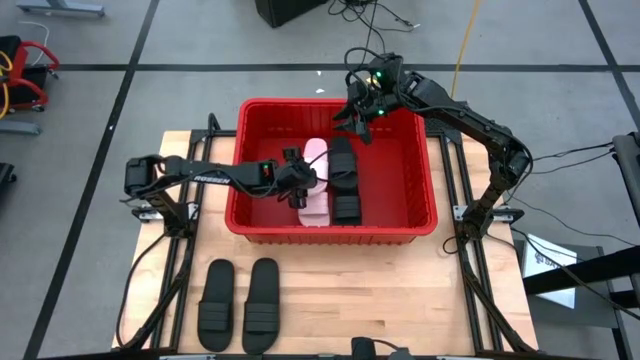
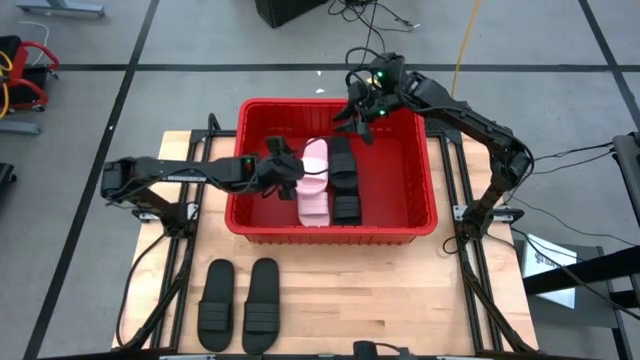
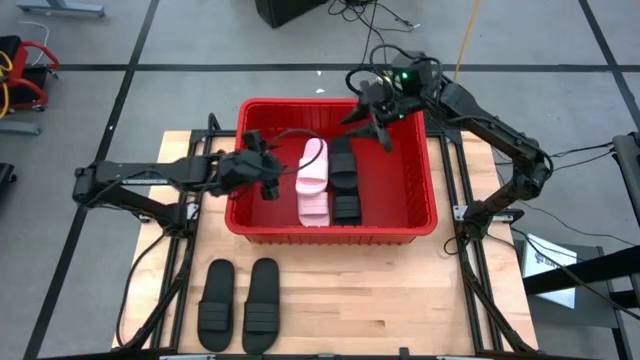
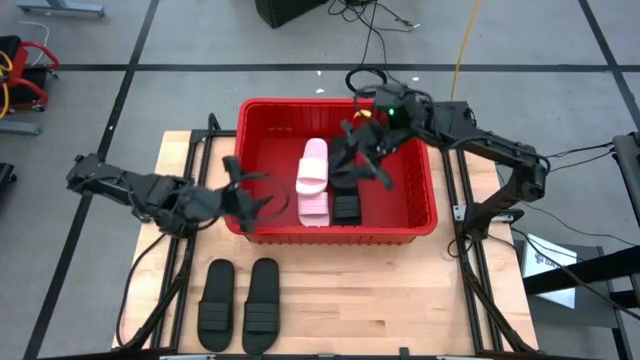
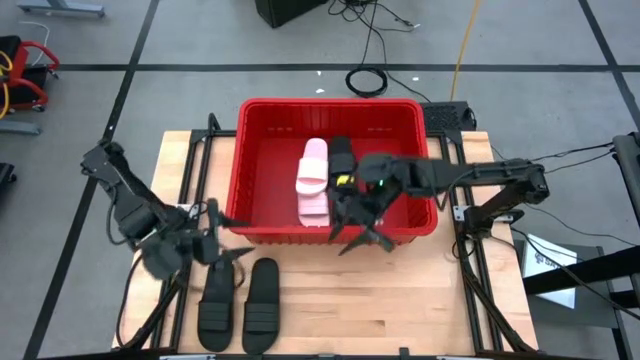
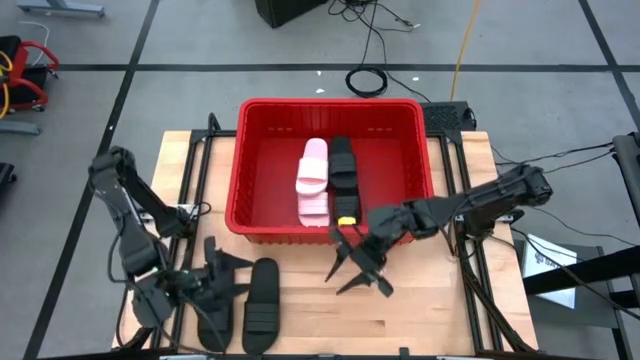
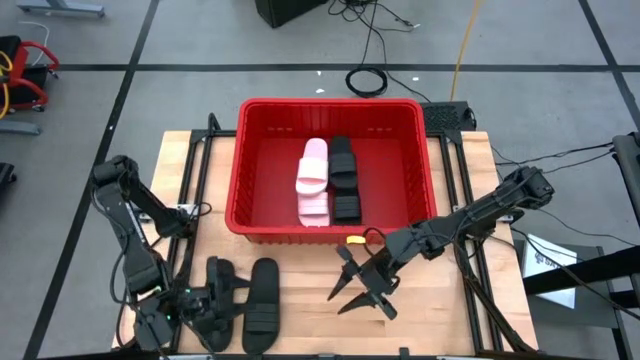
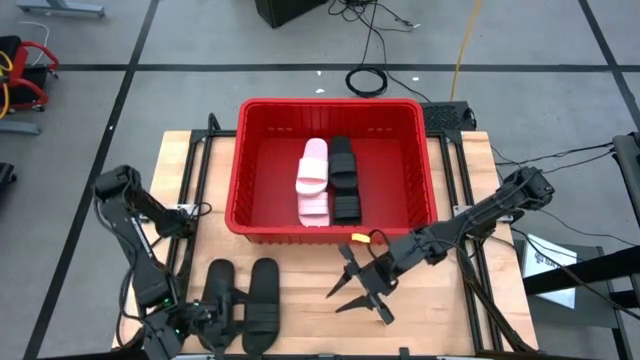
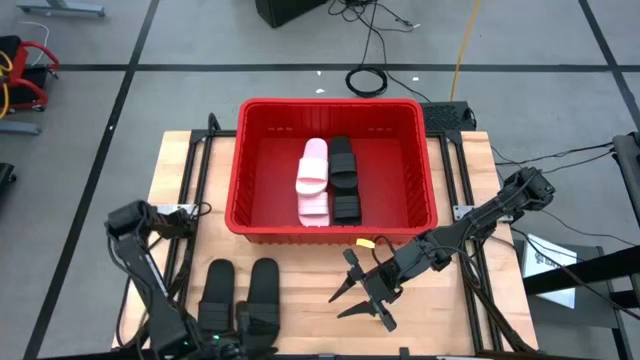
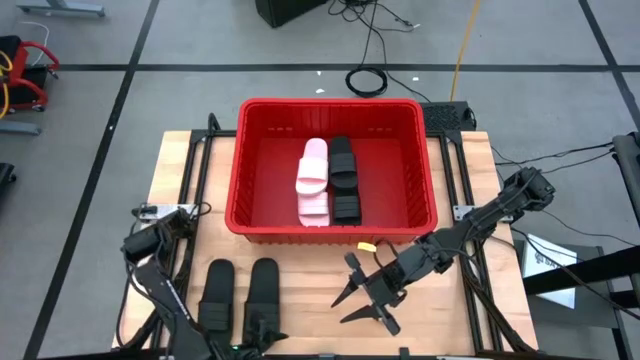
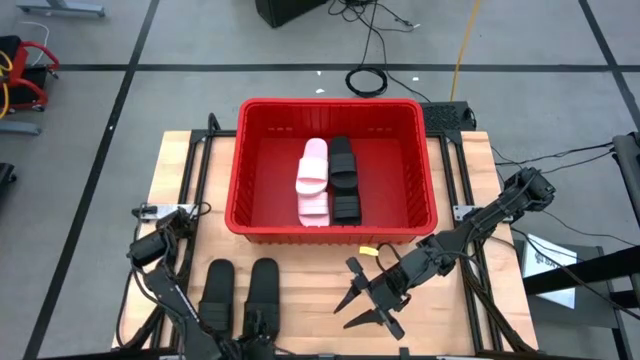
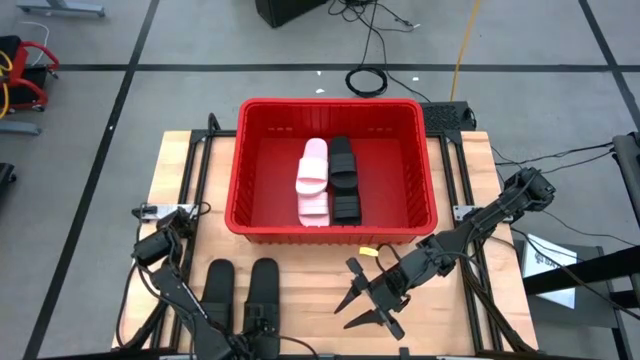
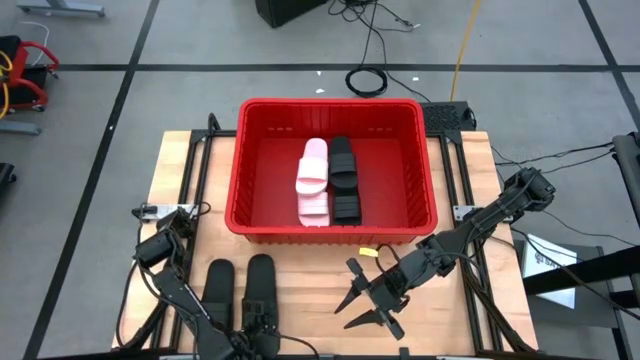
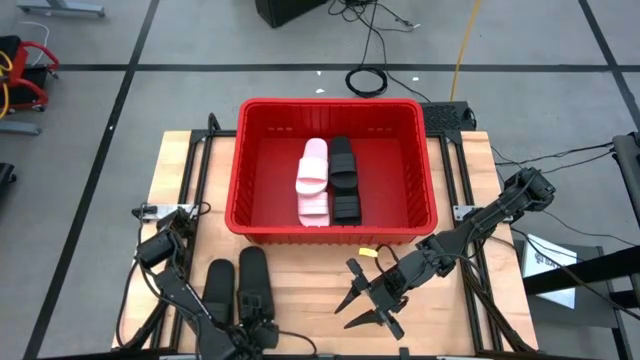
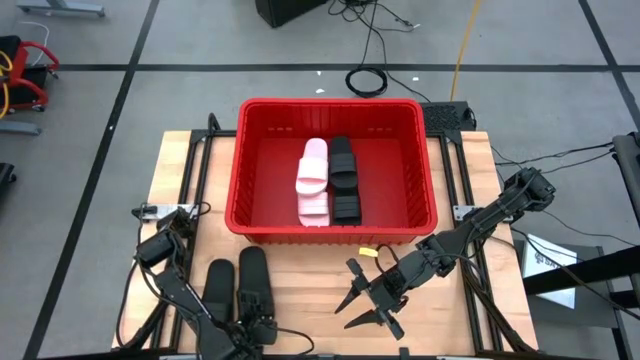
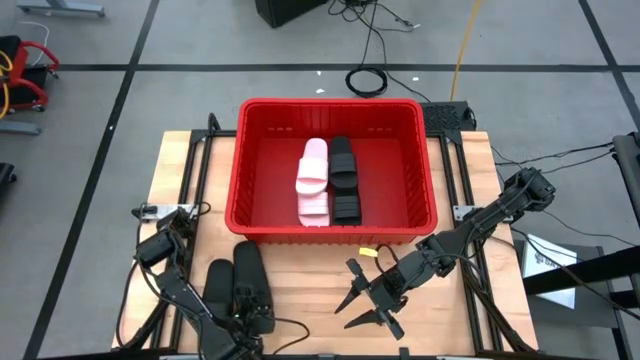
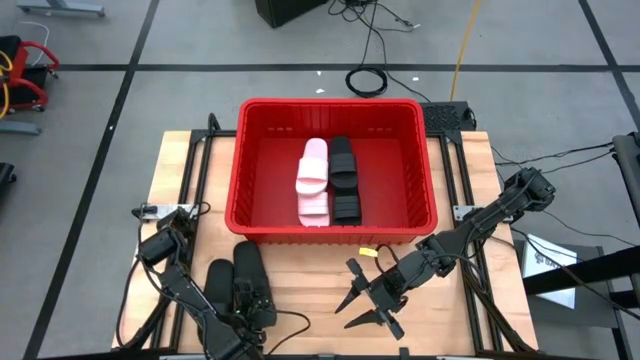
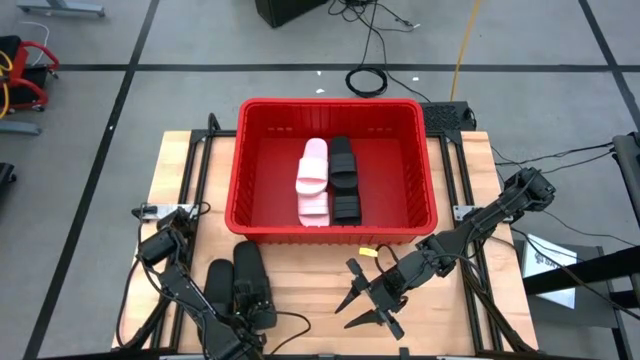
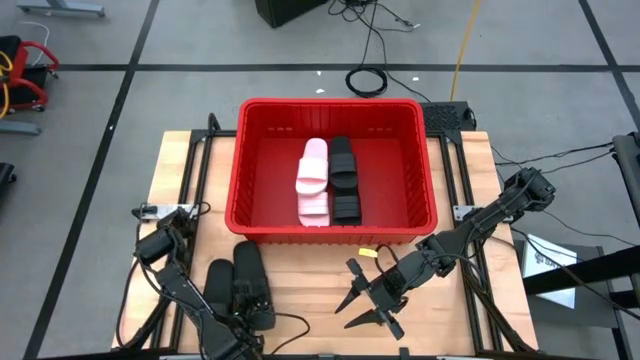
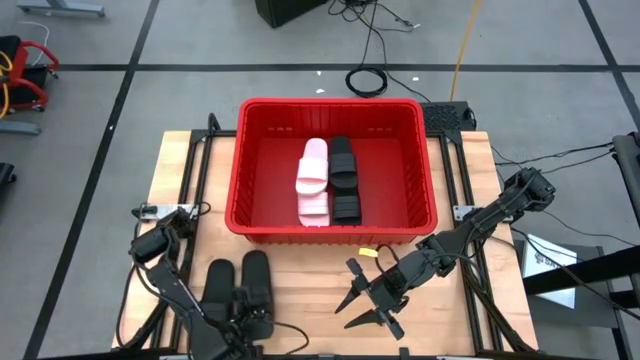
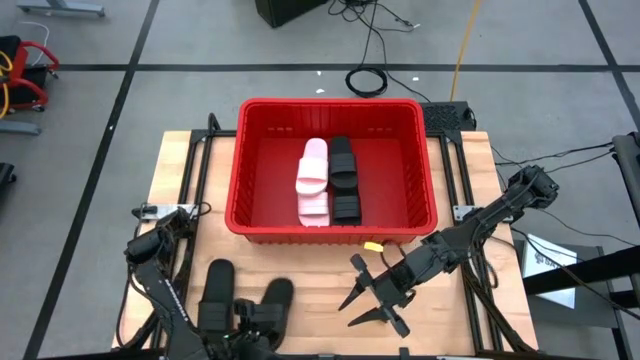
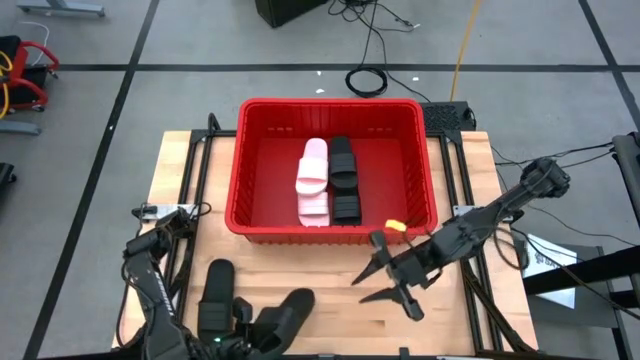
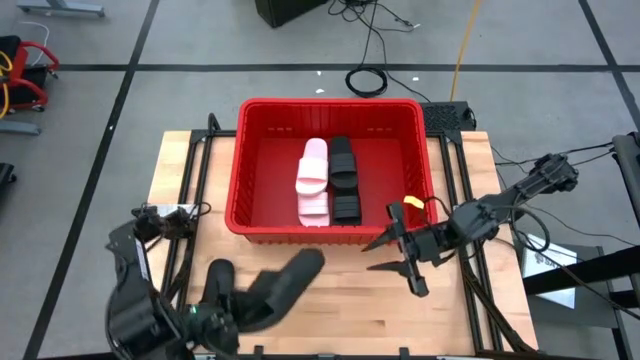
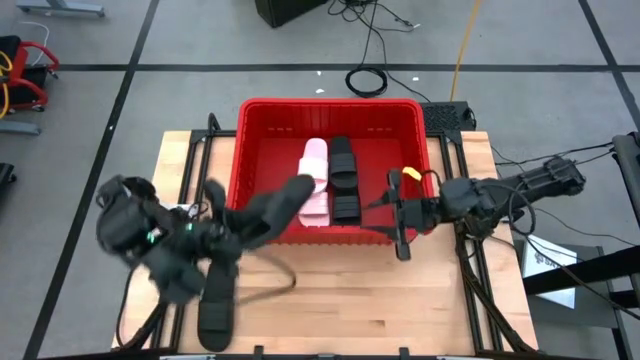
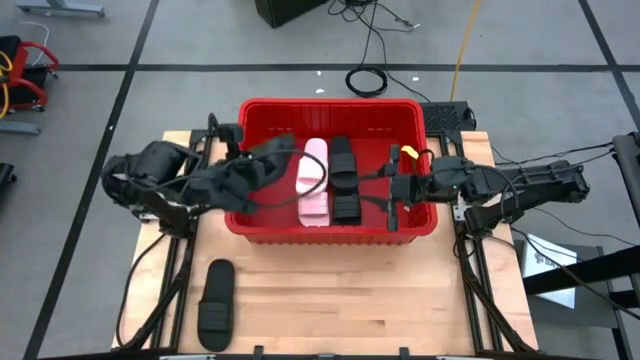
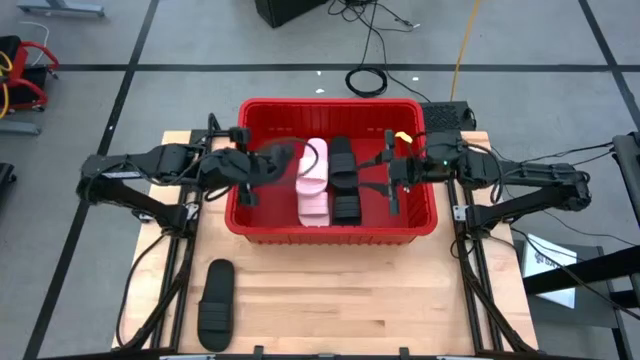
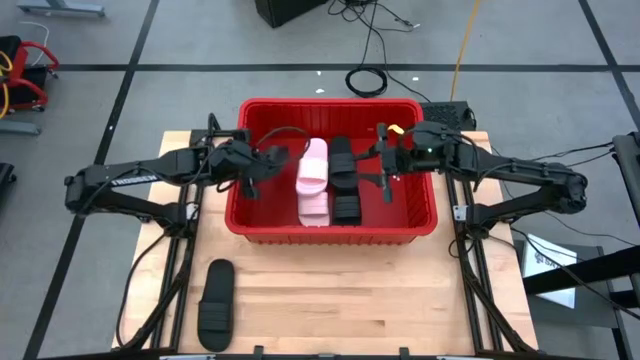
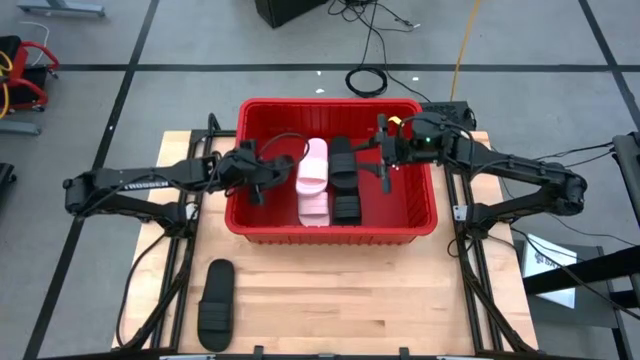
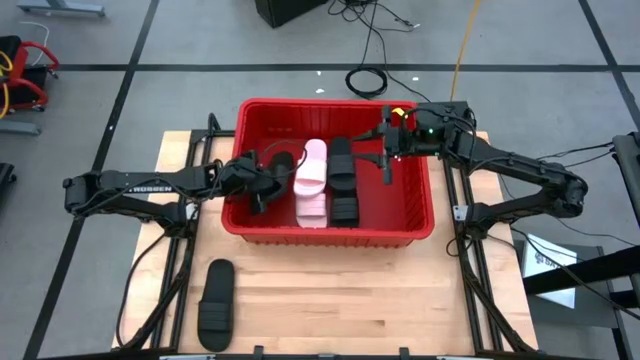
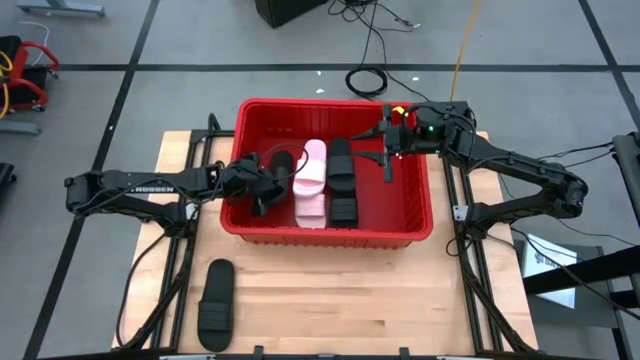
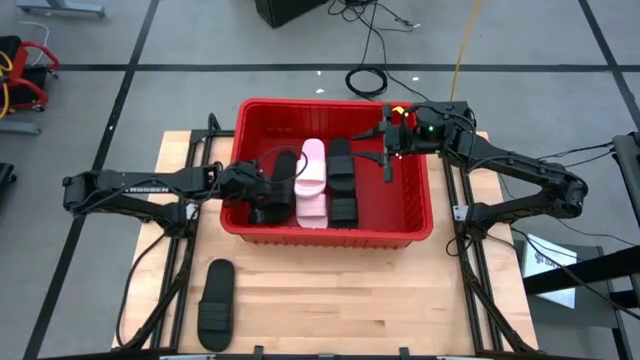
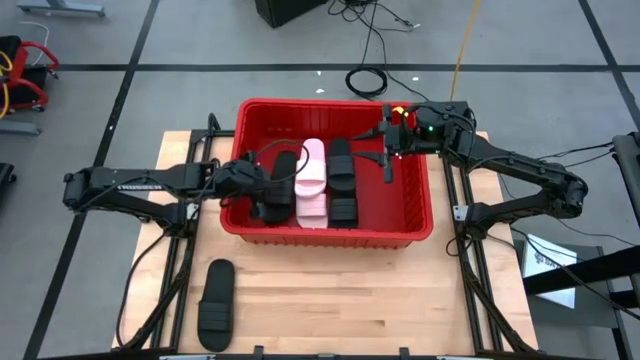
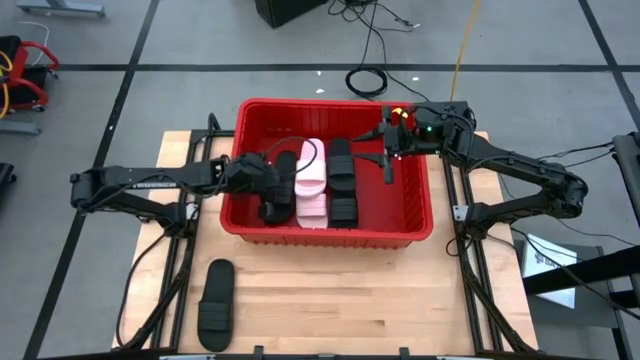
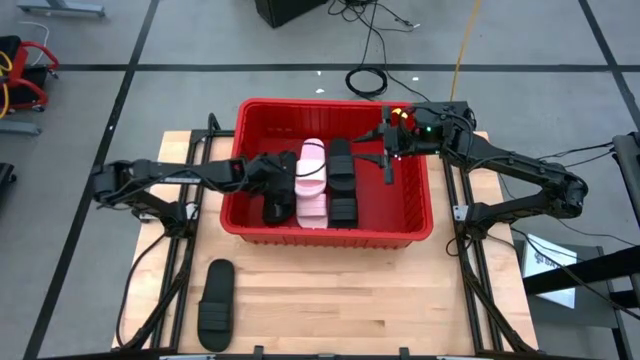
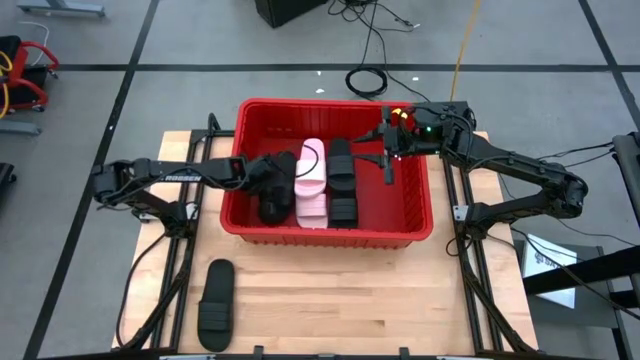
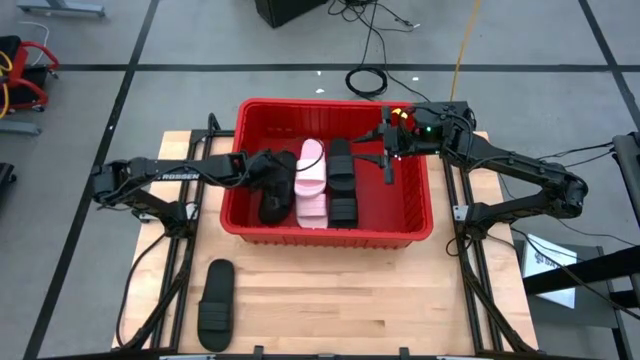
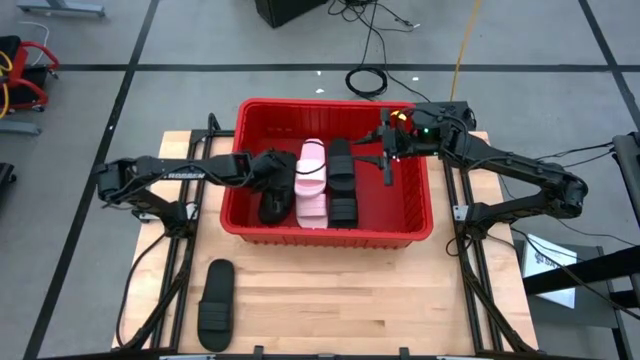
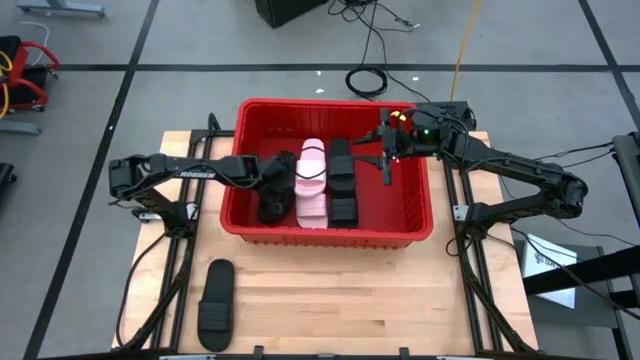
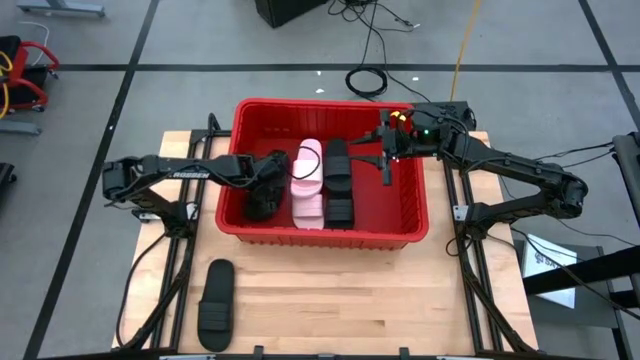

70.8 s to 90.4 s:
Task: Pick and place slides into bin
Put the black slide into the red bin

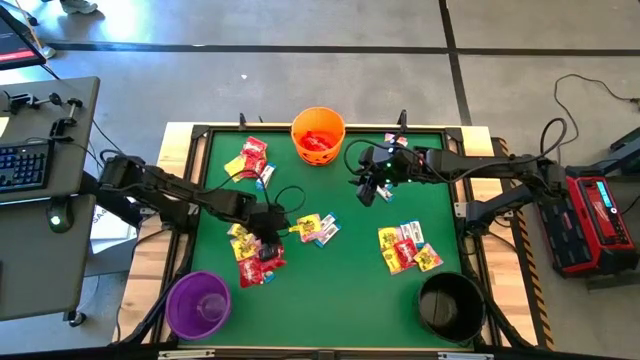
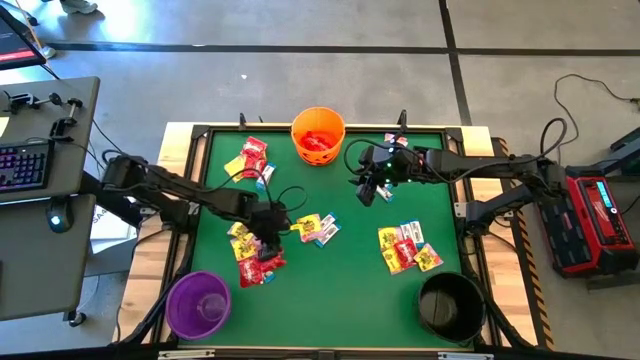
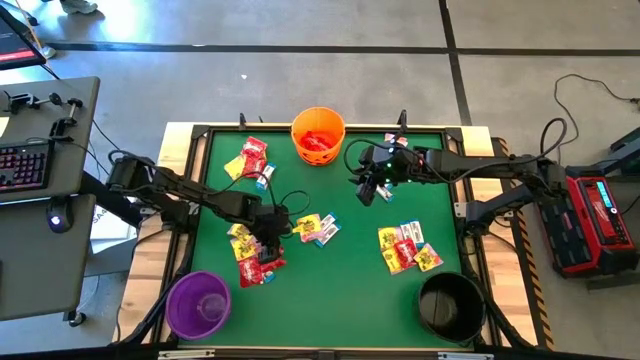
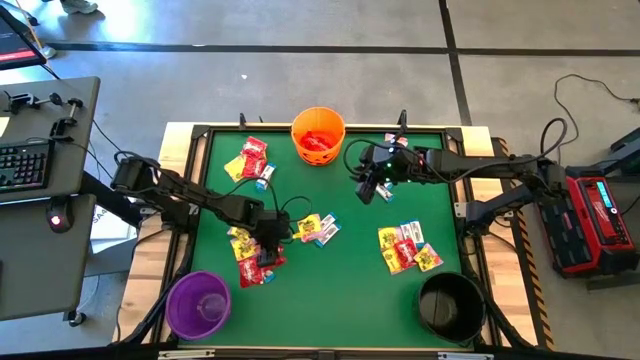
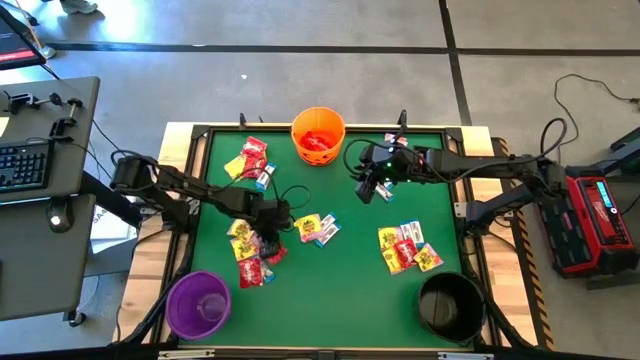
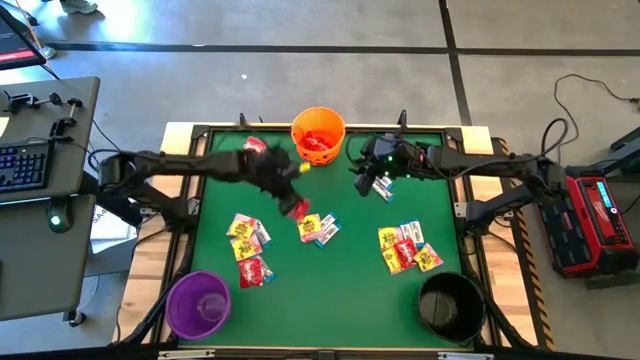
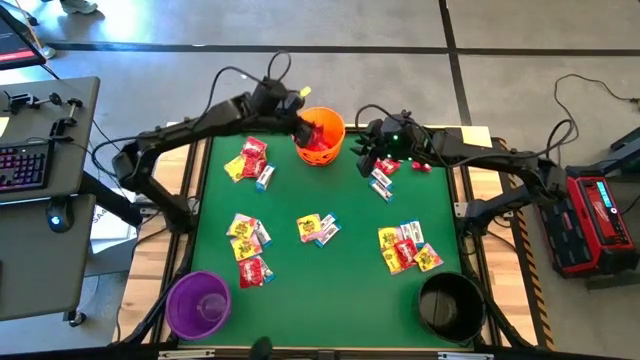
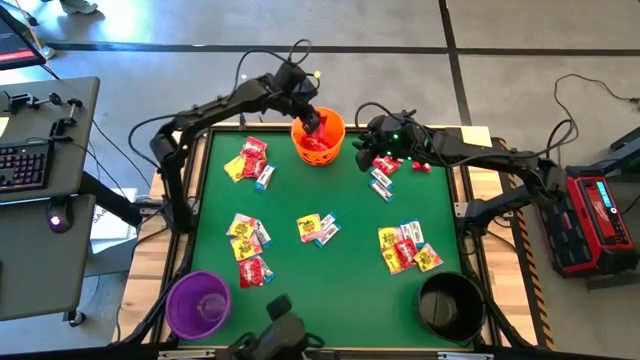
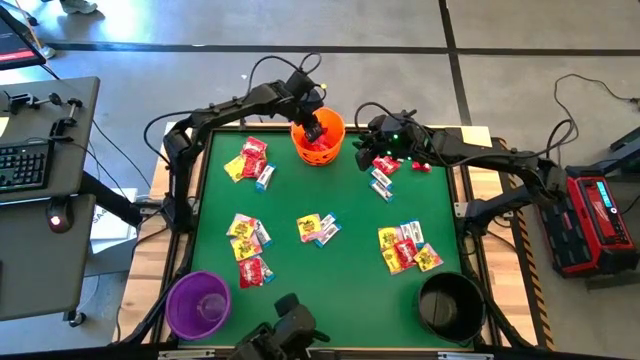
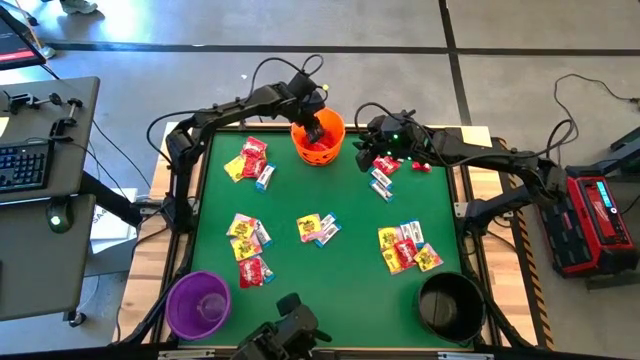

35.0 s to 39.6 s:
Task: Sort candy by brand, put in halloween buckets
Put the red candy into the orange bucket
